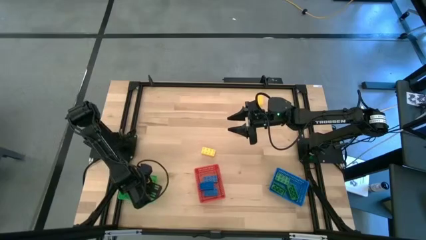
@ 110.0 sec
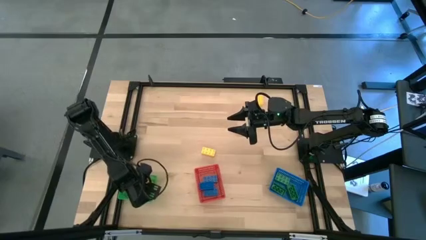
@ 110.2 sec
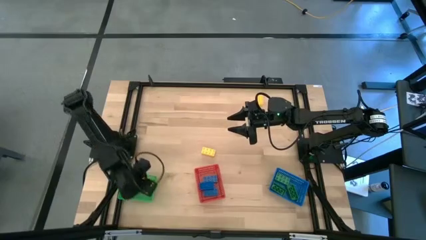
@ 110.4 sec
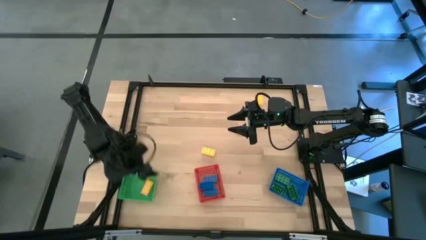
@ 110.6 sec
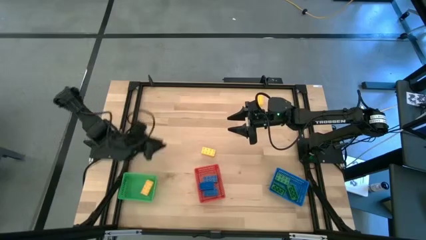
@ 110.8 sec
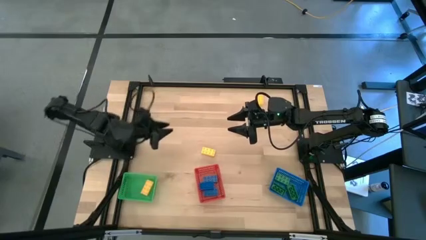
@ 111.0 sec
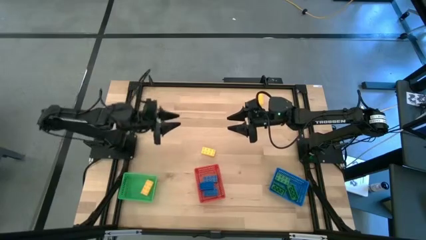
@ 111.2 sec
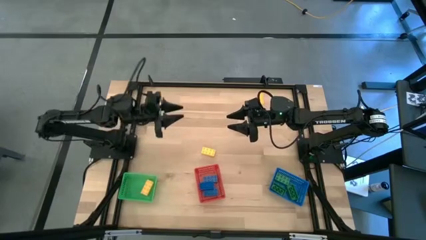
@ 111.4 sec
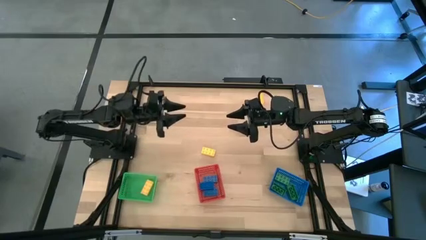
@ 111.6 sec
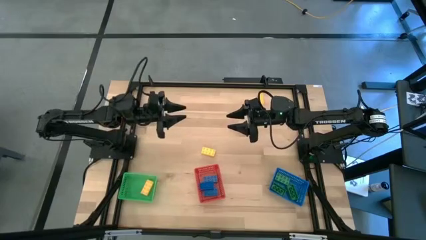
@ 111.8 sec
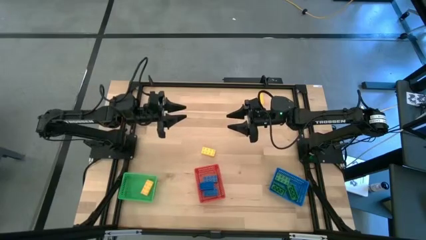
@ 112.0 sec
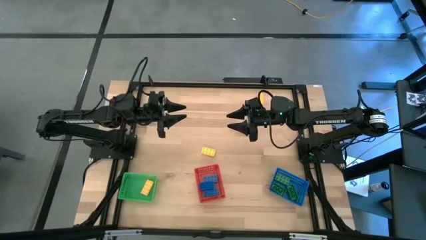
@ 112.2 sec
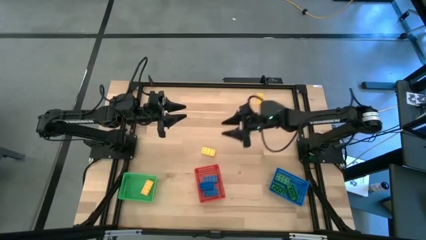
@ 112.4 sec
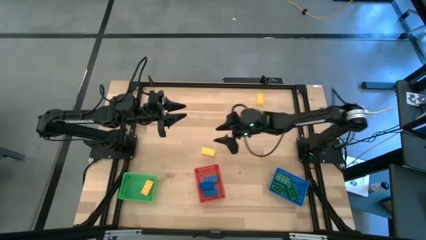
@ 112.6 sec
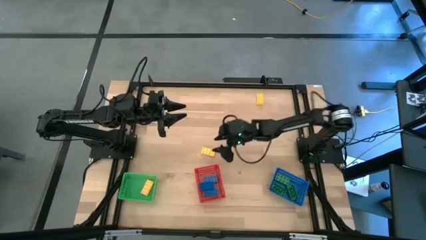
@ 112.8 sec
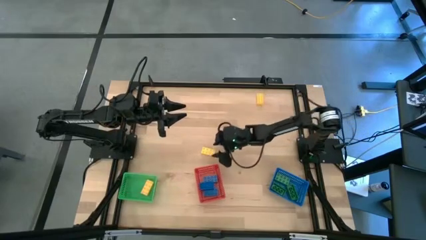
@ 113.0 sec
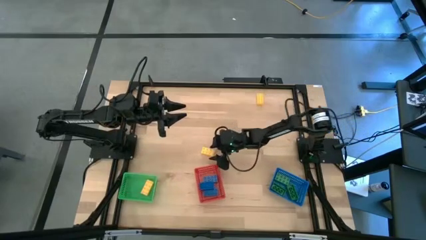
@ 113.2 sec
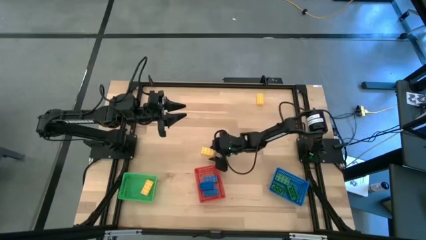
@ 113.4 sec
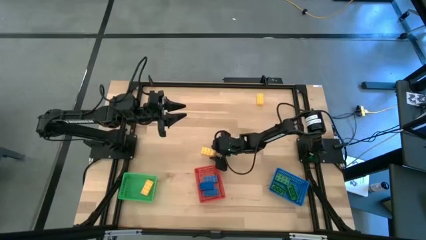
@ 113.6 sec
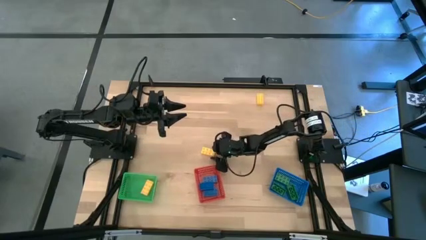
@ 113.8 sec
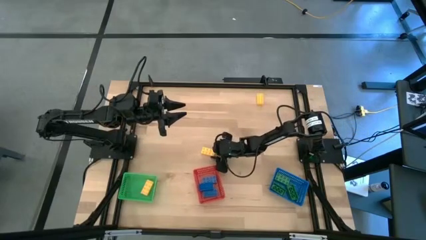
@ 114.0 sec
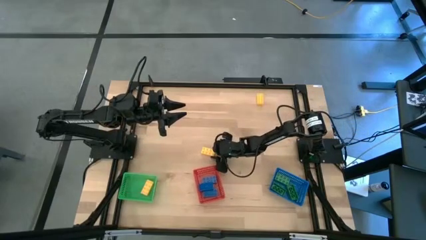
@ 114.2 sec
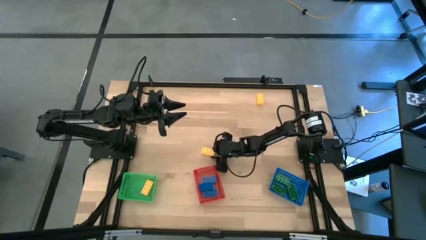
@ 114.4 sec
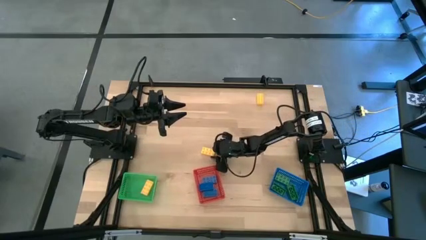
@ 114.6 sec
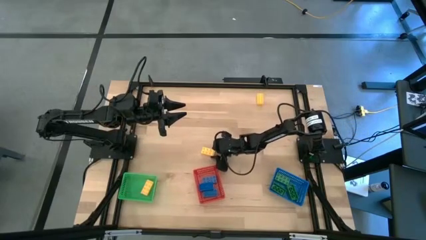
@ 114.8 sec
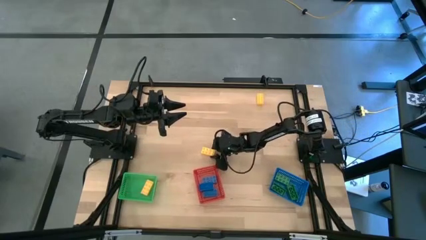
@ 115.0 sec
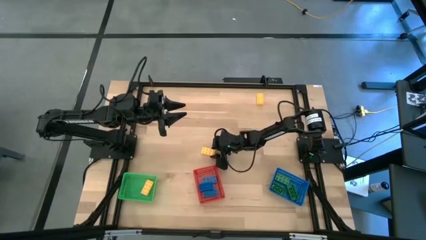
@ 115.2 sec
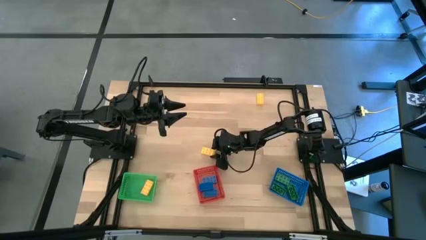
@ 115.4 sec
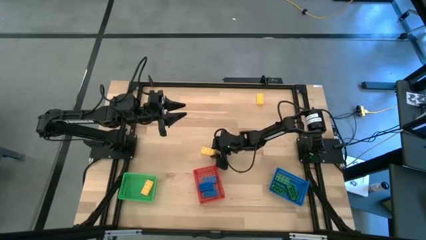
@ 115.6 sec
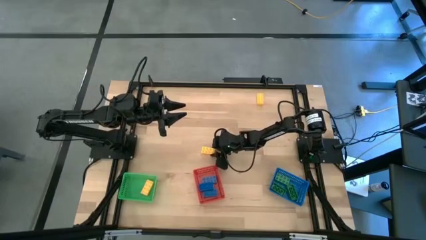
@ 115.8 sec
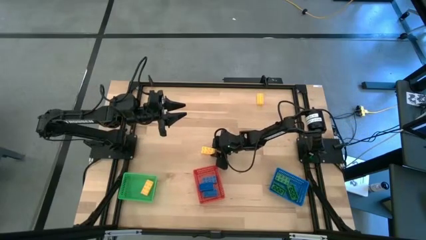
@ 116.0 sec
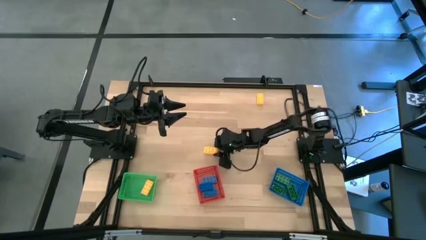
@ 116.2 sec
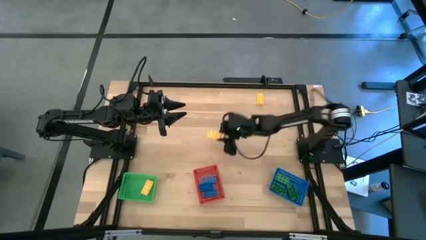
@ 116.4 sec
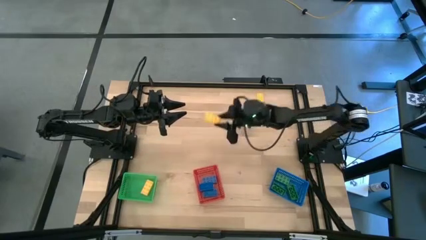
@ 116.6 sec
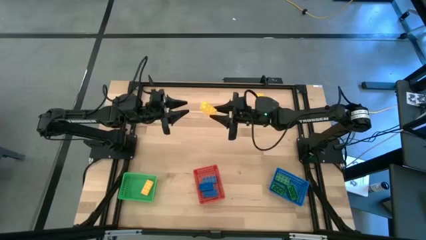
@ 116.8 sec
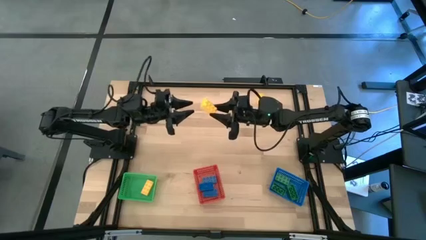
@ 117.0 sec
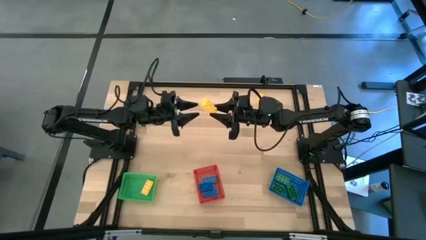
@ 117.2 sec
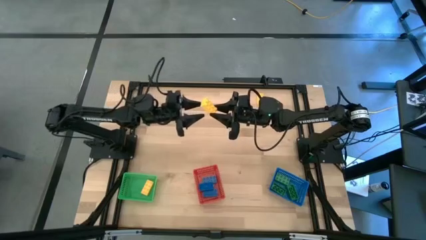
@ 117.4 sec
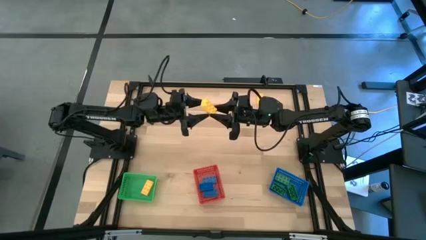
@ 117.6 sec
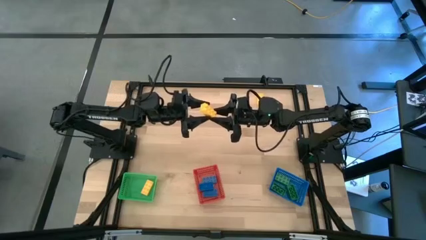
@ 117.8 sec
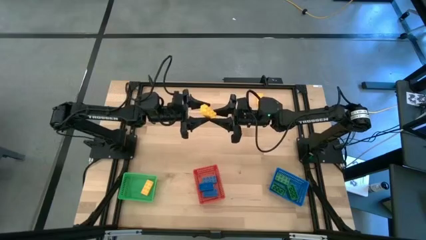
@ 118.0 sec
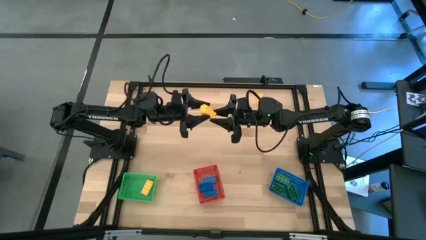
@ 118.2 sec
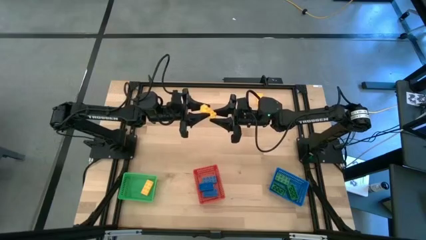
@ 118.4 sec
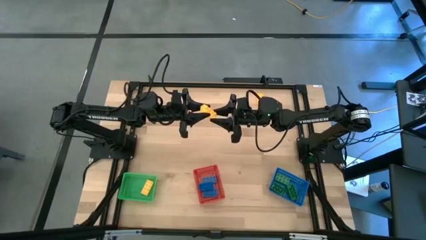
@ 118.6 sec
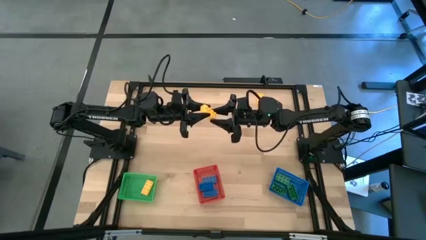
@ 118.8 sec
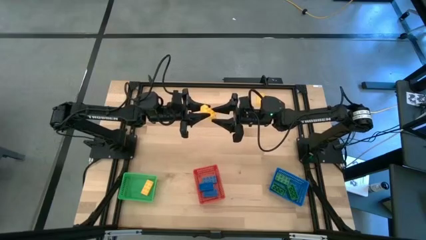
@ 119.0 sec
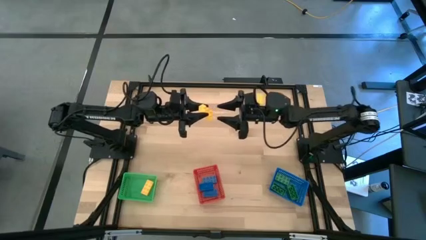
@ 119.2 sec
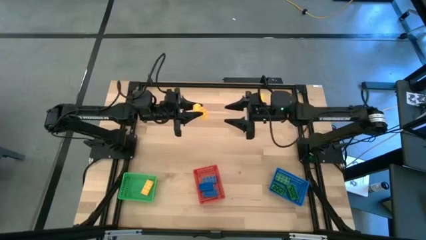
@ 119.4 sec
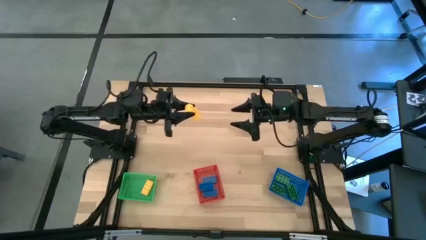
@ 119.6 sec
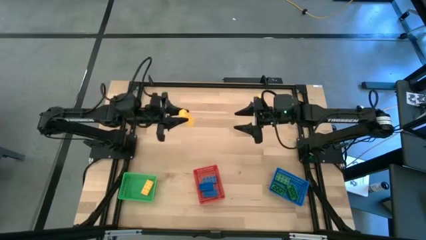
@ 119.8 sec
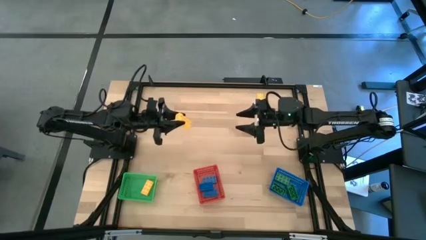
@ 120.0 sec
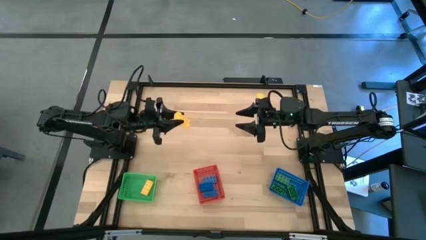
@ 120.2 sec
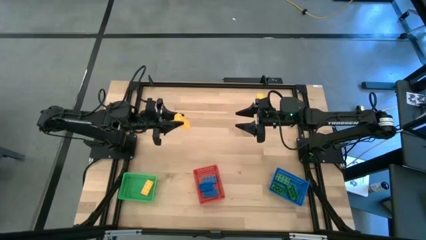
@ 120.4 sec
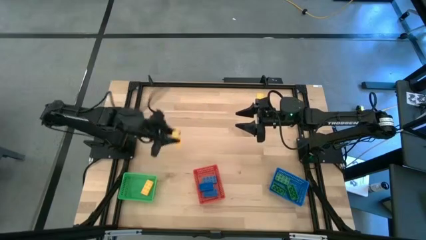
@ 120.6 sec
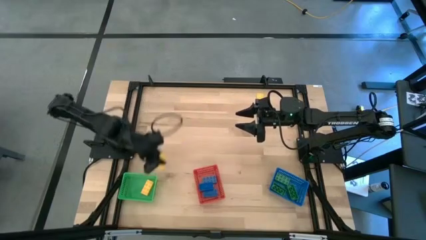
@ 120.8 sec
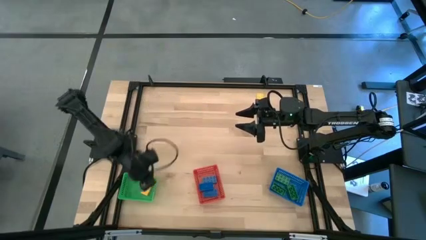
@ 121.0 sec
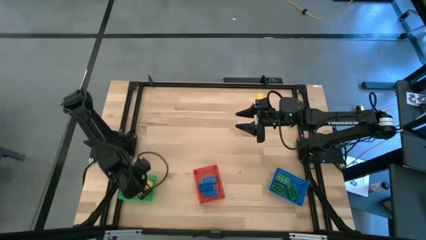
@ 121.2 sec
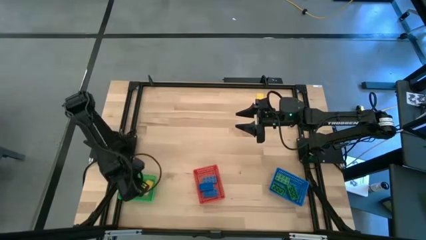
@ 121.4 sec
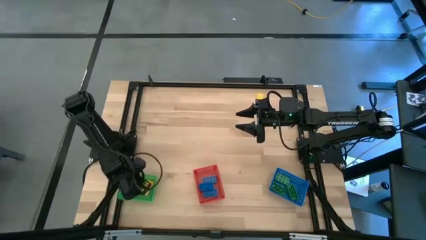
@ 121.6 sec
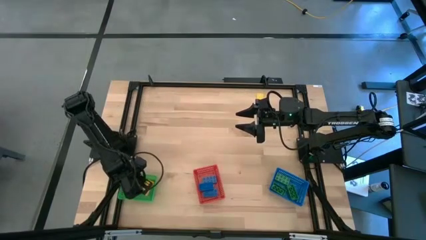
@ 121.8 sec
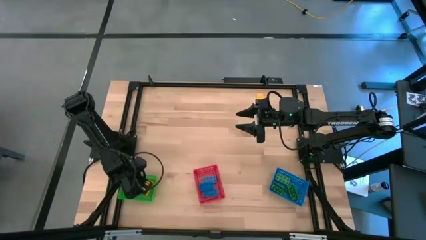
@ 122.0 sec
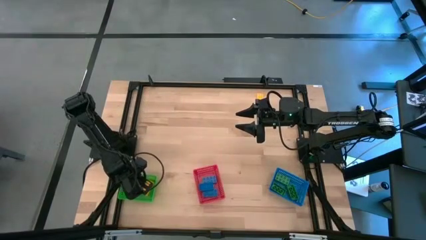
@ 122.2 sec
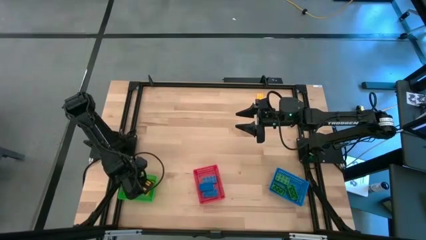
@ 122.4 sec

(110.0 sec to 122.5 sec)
Task: Sort & place blocks by color
Put the bottom yellow game piece into the green bin
